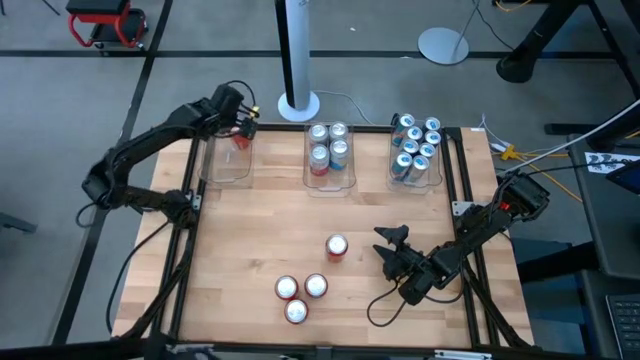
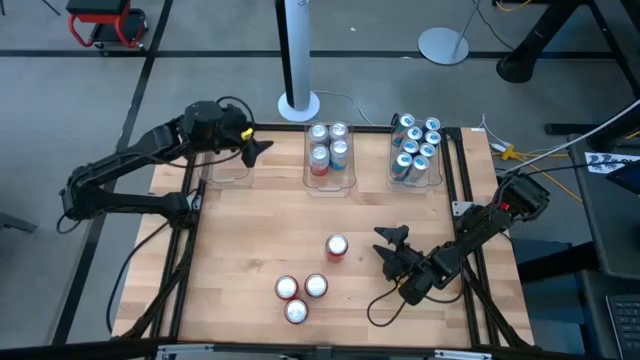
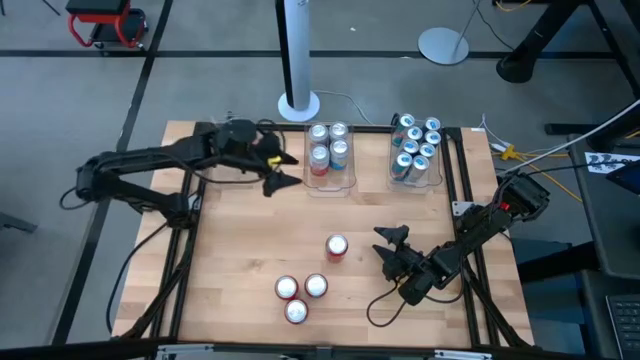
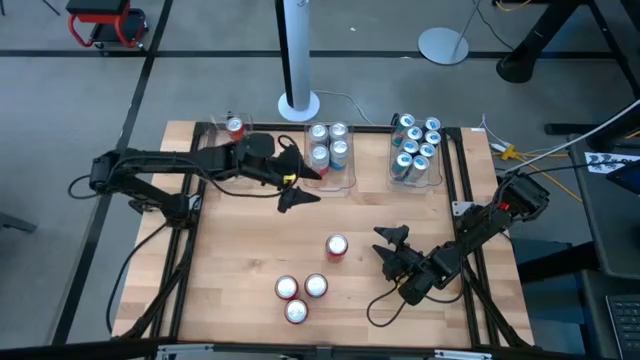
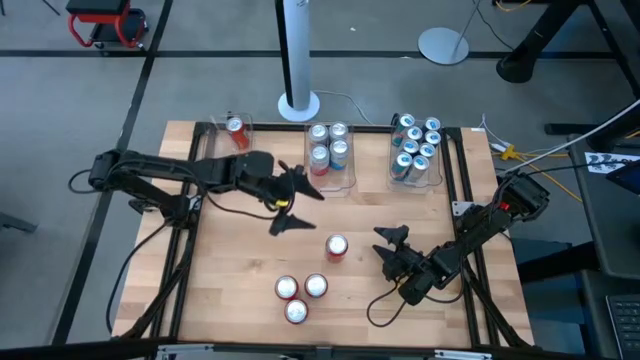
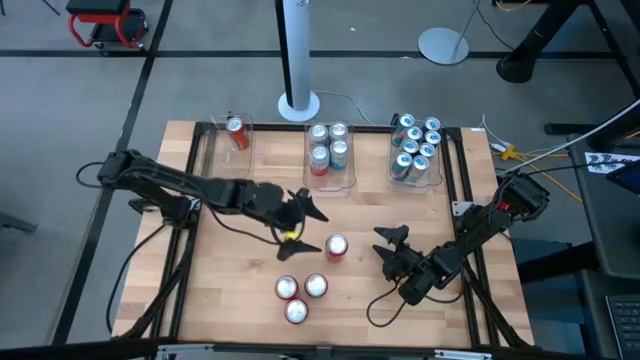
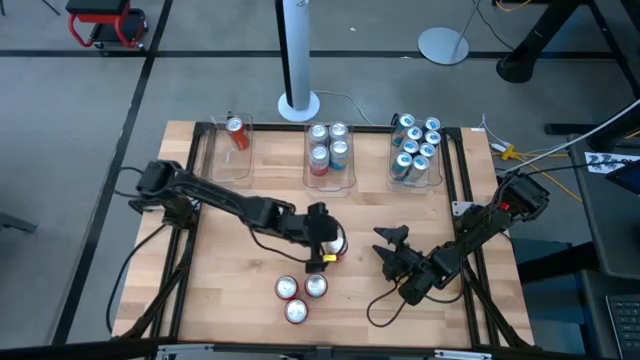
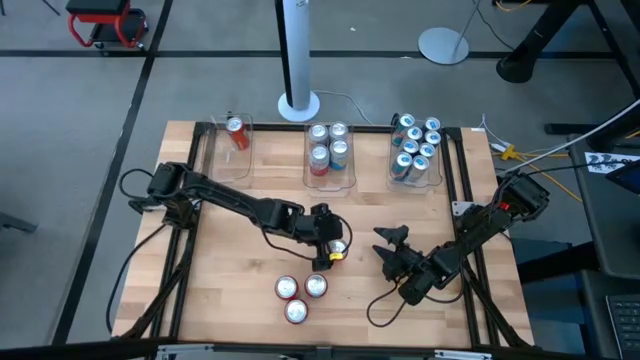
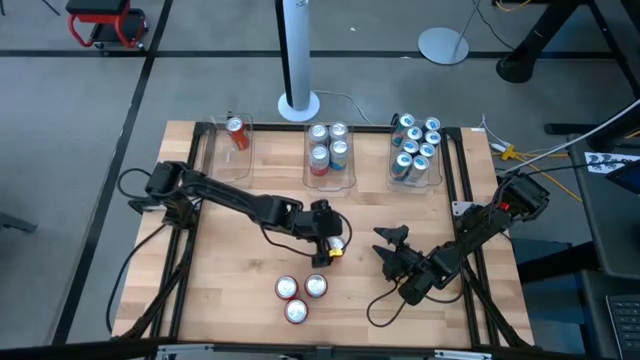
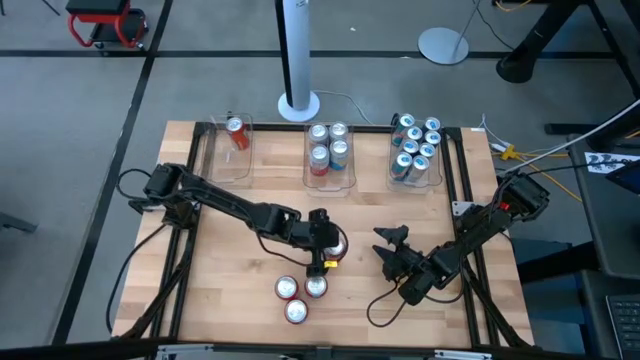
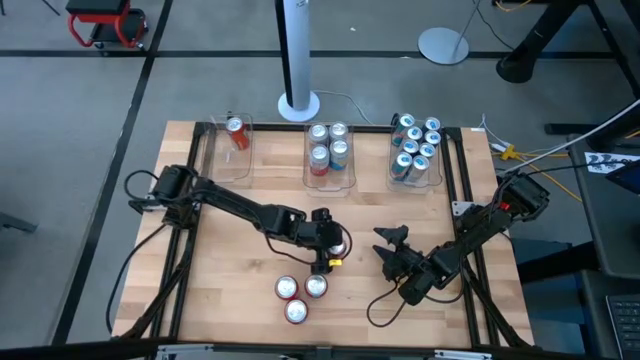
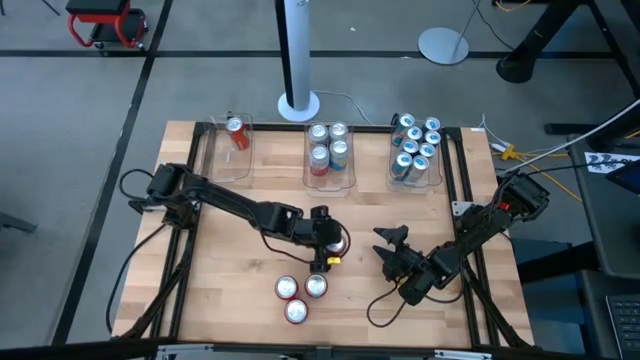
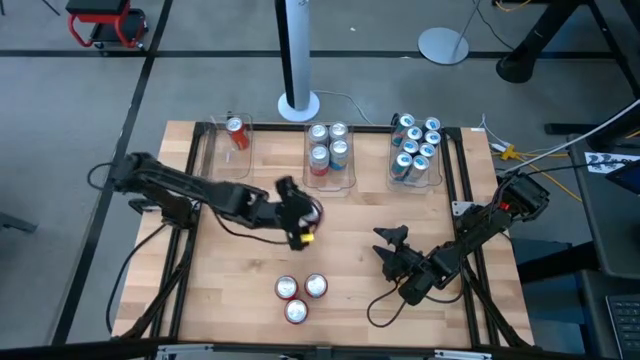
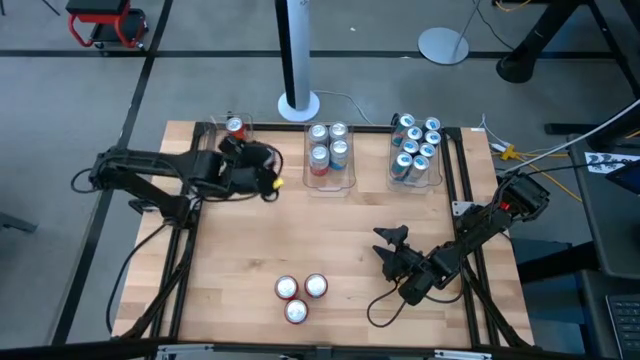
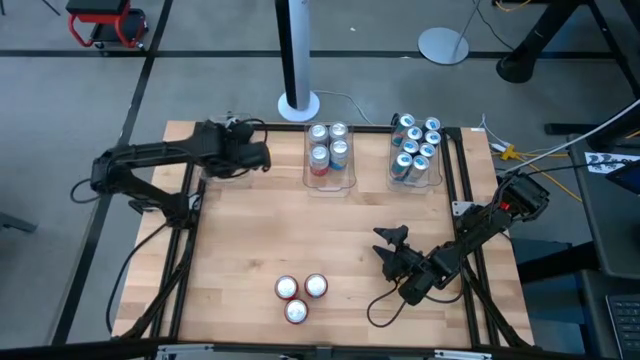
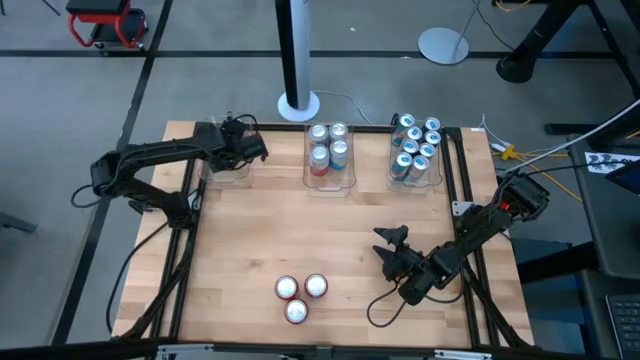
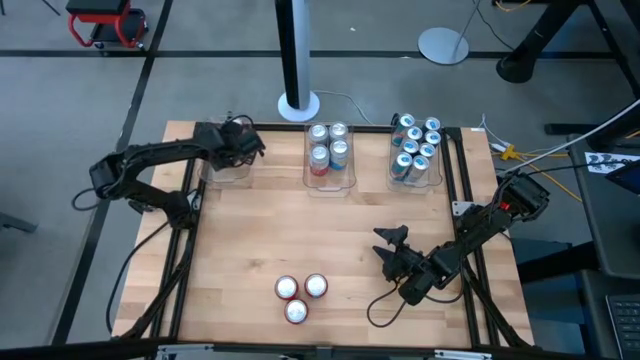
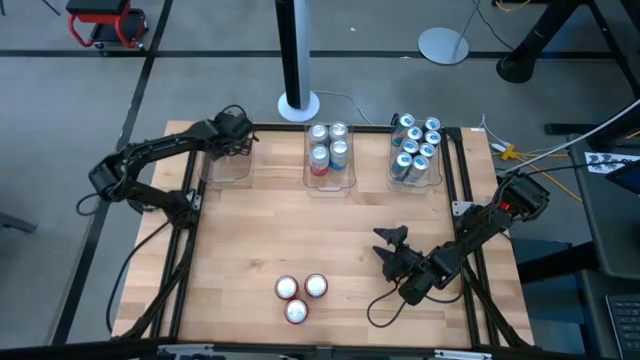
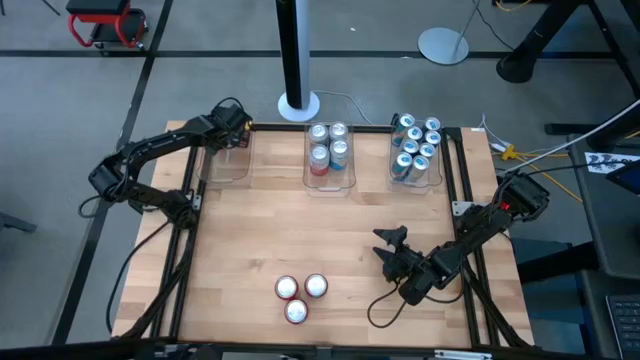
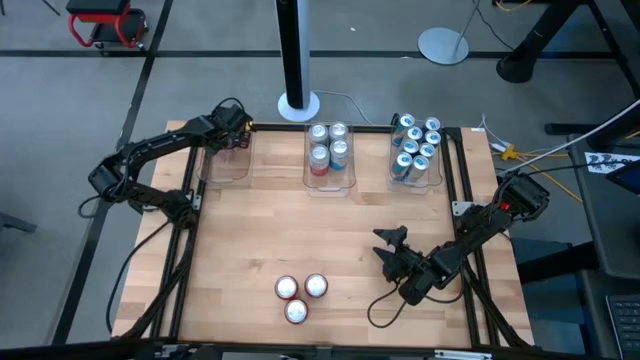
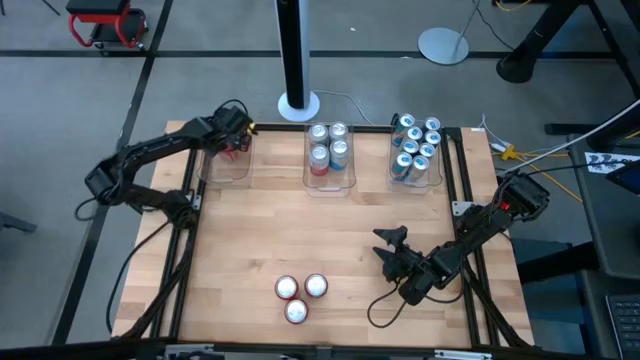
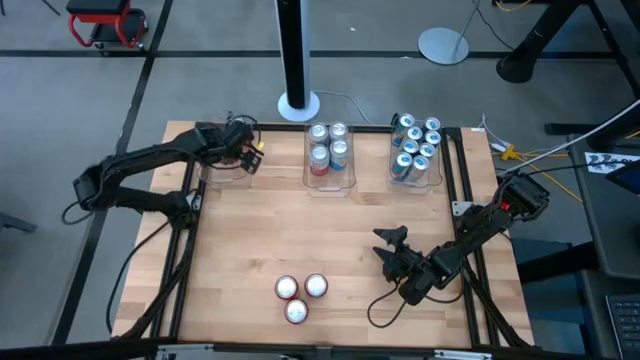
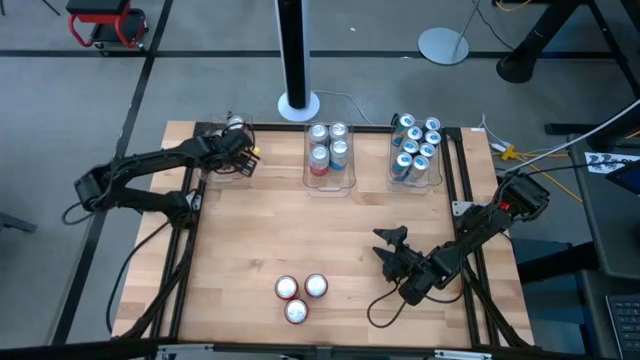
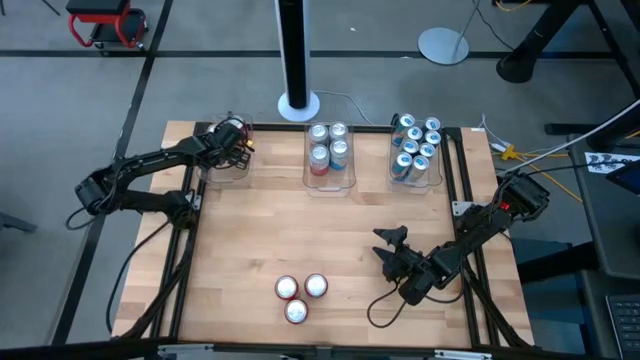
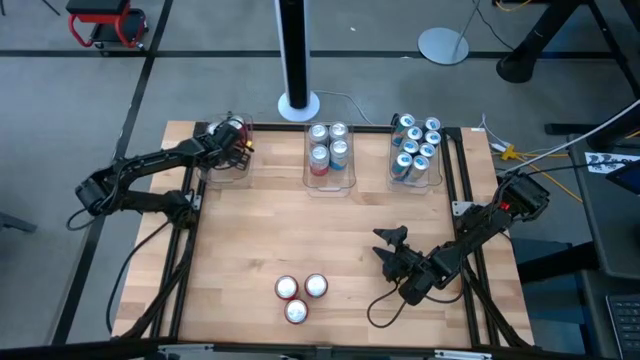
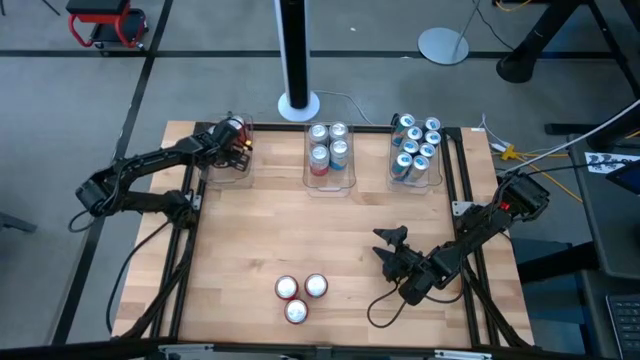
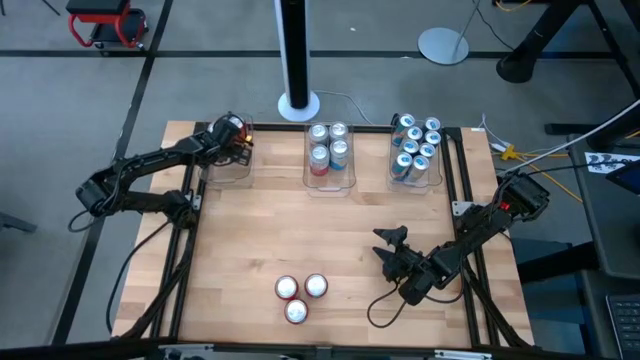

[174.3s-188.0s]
Task: Sort soda cans
Put the red soda can into the top left transparent bin

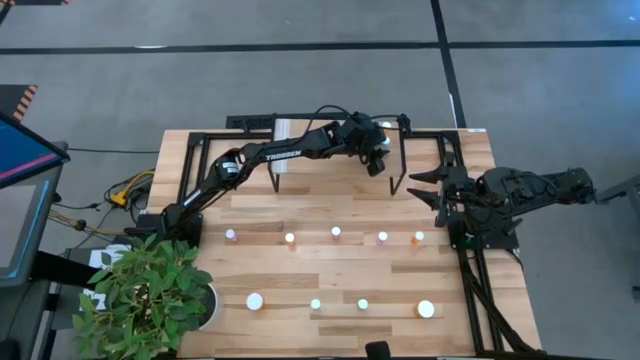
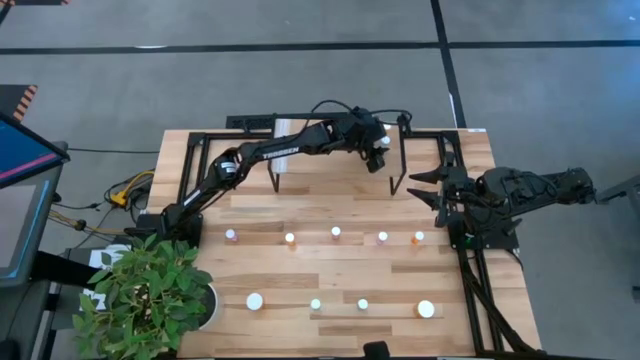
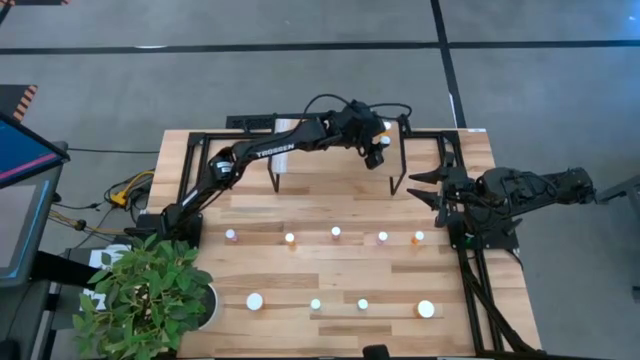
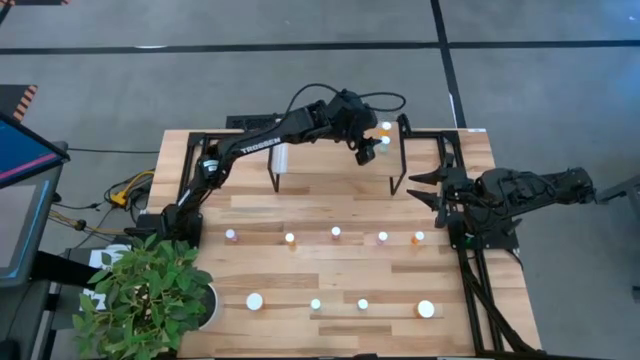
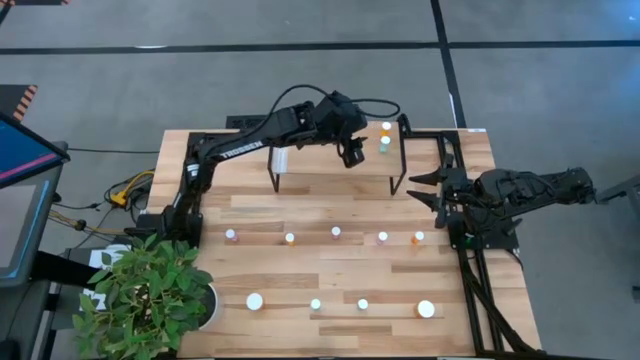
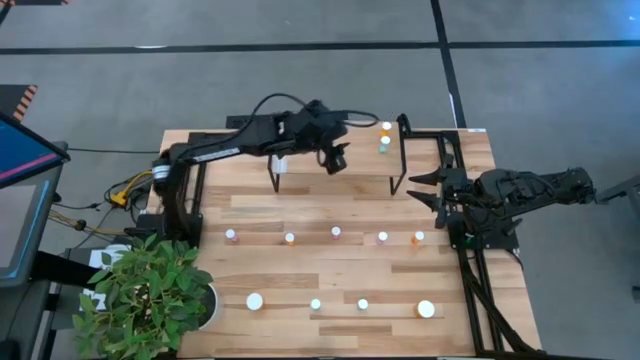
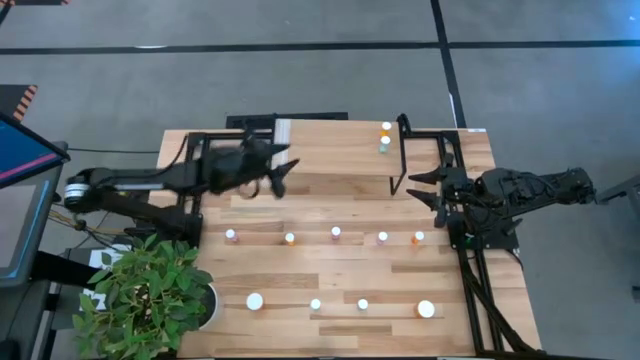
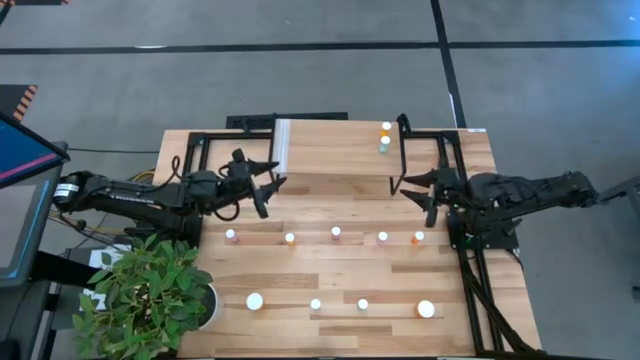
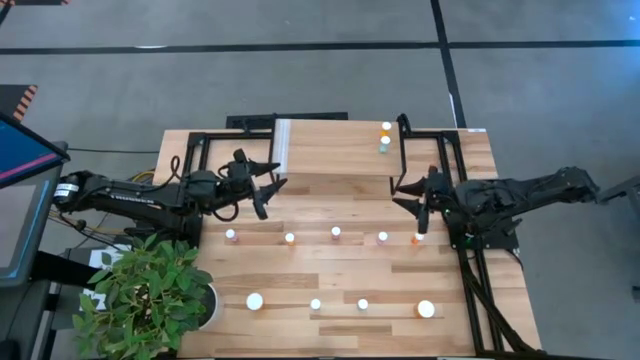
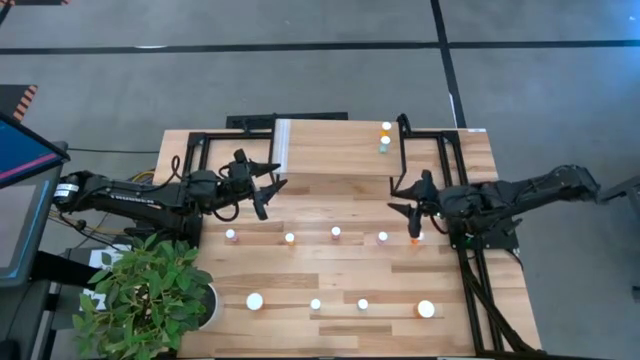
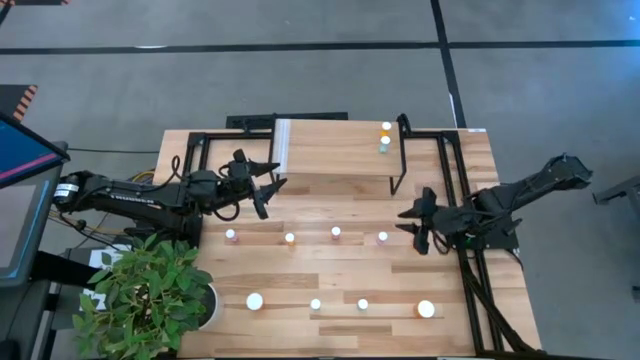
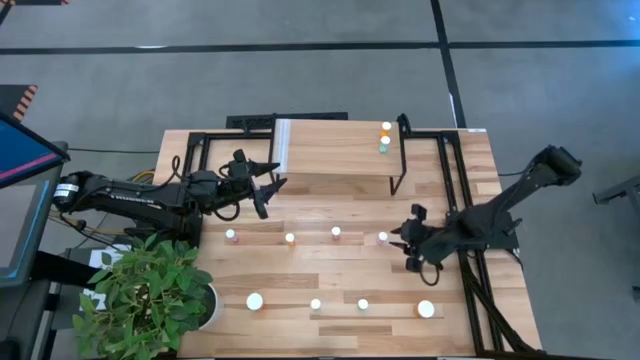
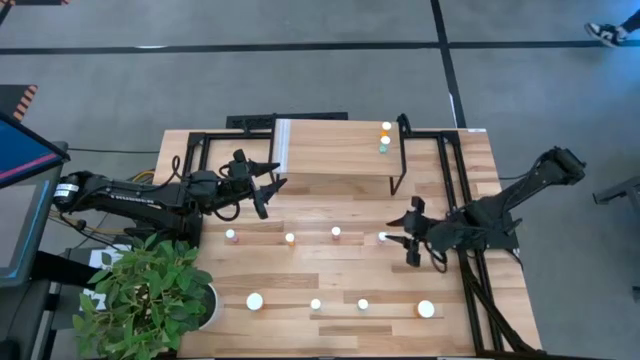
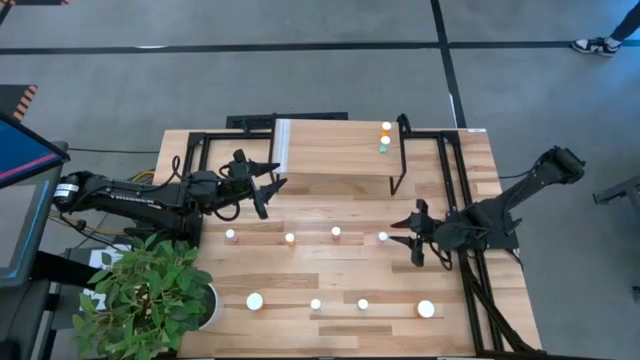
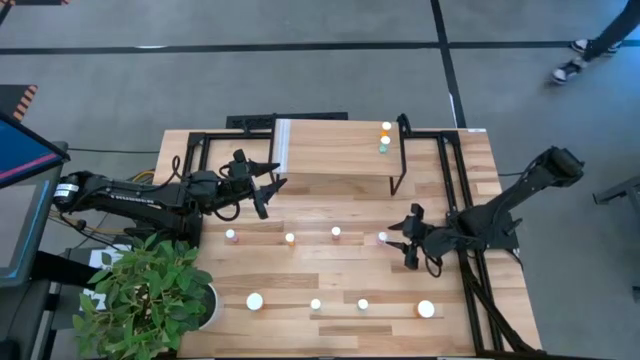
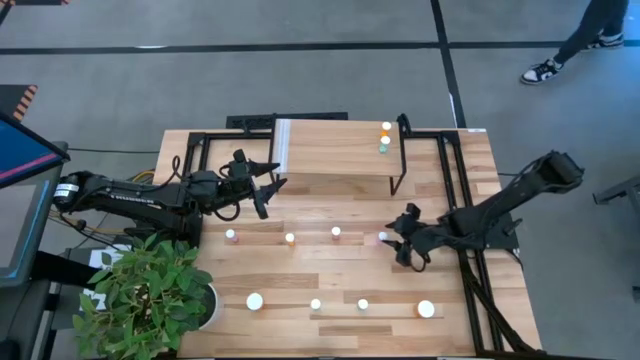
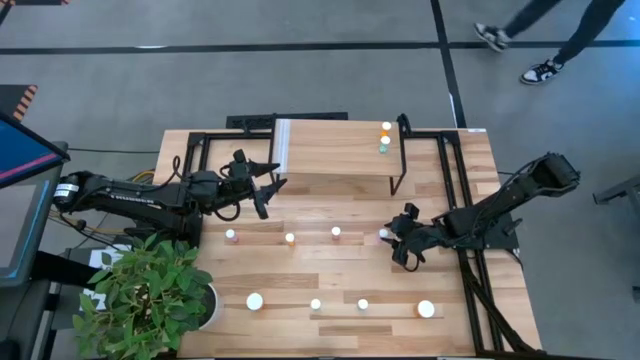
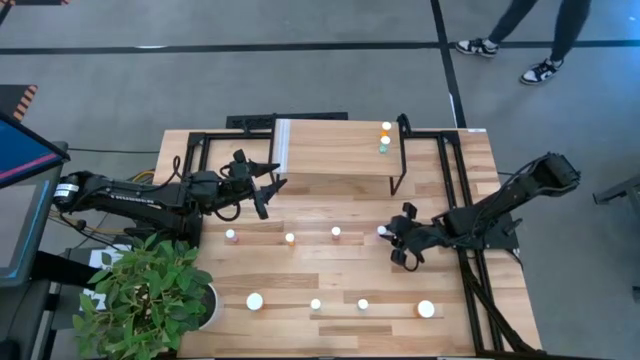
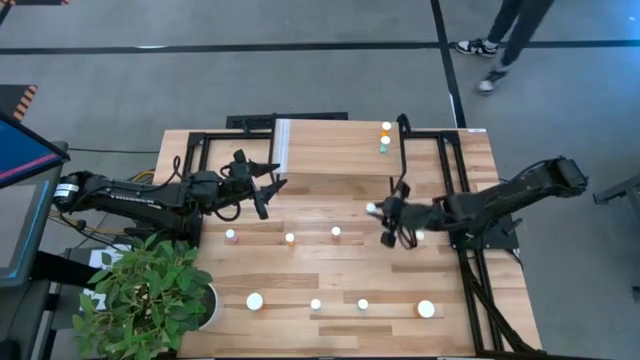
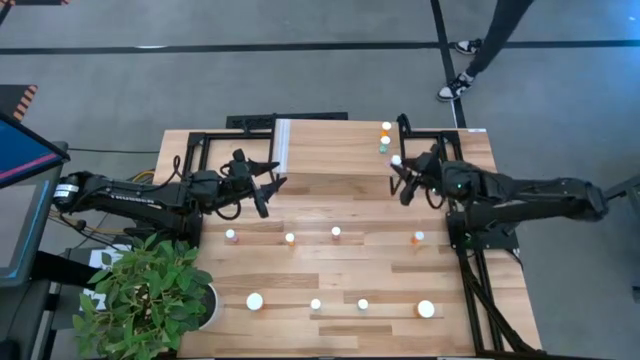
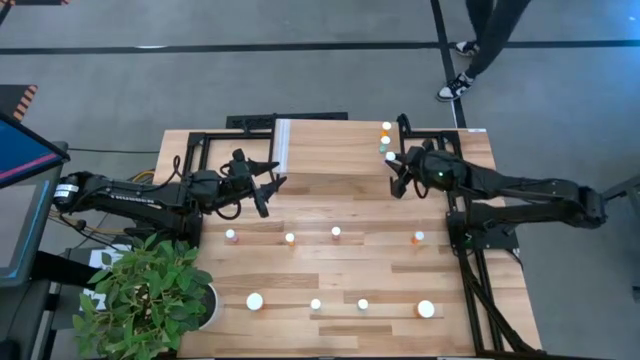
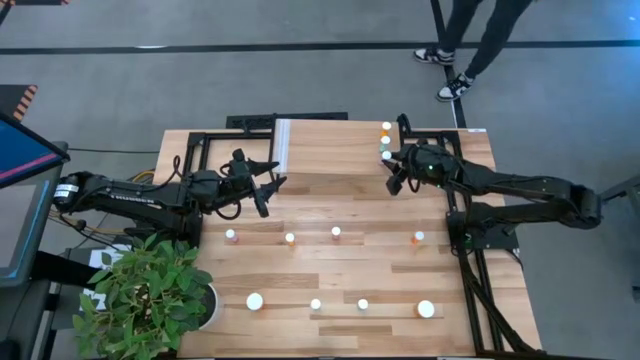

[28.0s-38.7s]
Task: Pick and place medicine bottles onto shelf by color
Put the right pink pill bottle on the shelf
